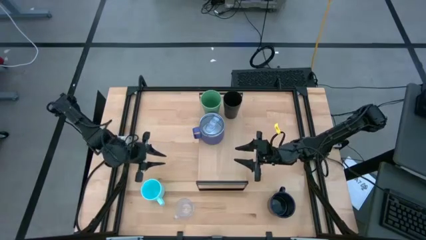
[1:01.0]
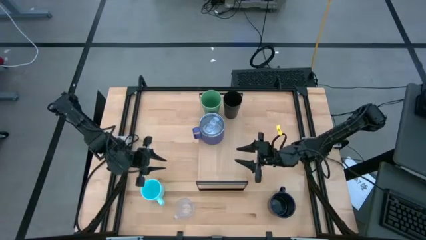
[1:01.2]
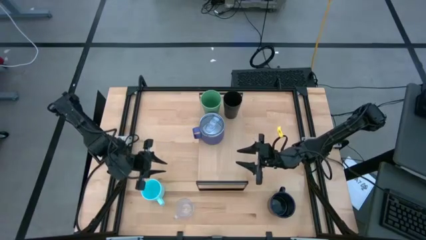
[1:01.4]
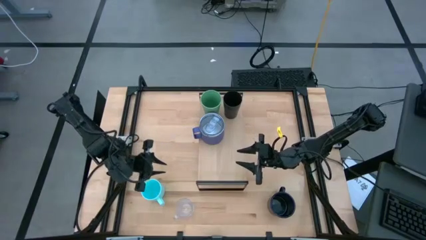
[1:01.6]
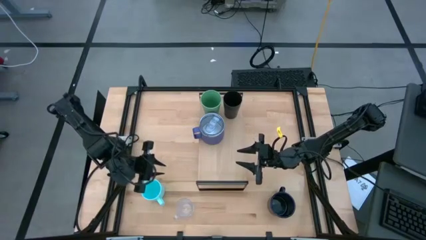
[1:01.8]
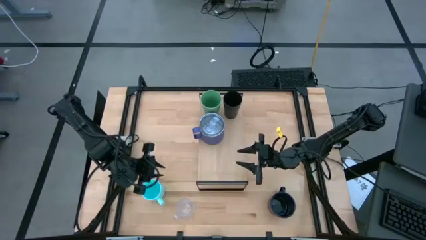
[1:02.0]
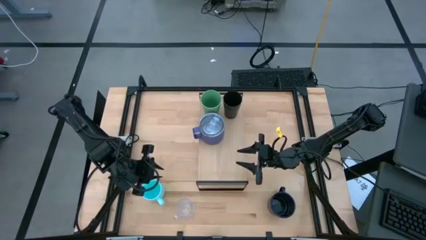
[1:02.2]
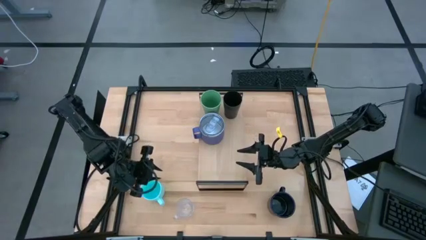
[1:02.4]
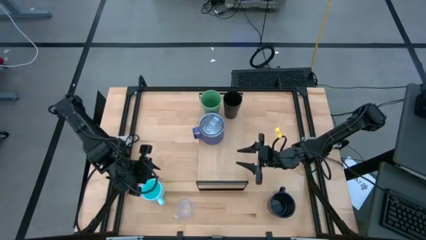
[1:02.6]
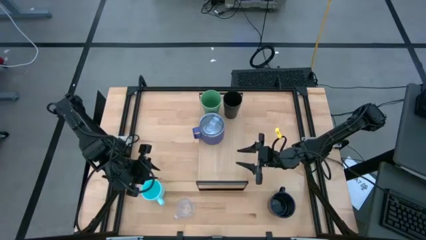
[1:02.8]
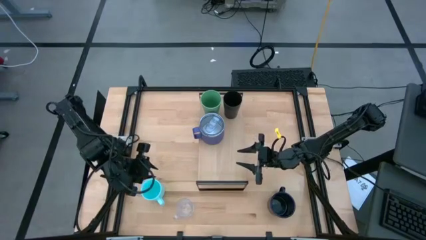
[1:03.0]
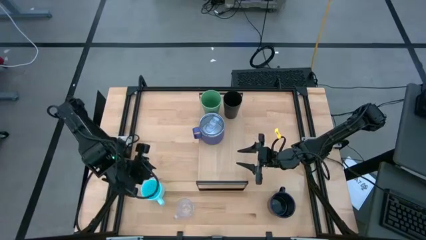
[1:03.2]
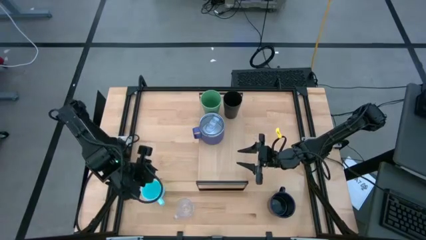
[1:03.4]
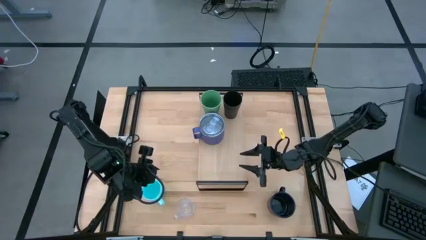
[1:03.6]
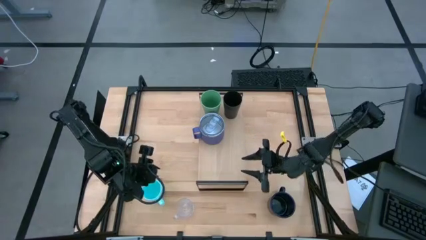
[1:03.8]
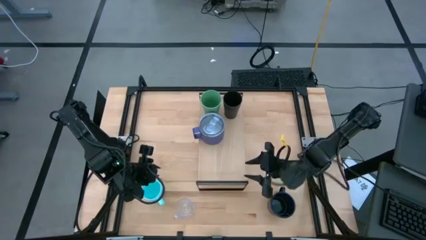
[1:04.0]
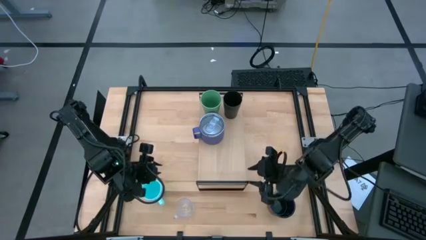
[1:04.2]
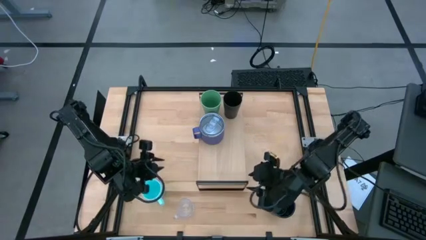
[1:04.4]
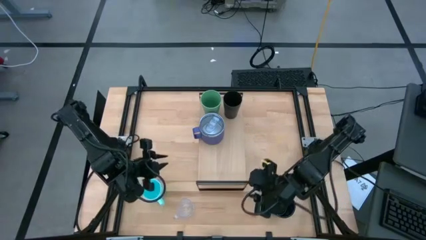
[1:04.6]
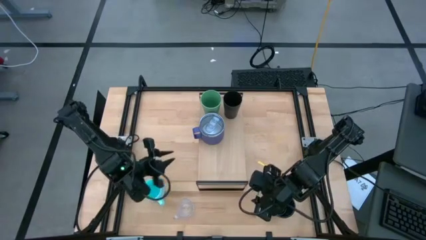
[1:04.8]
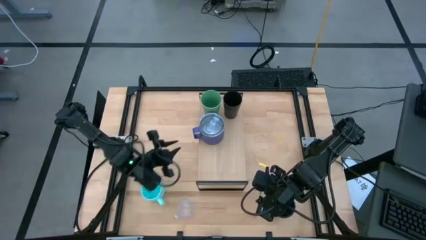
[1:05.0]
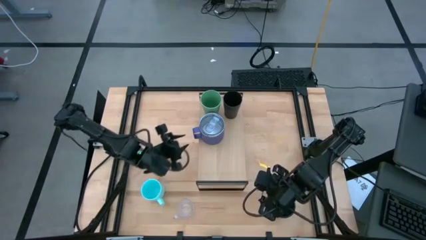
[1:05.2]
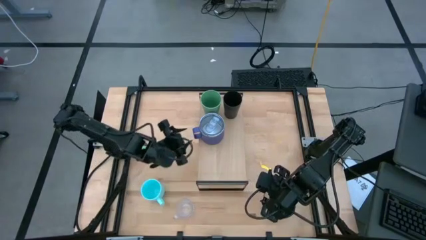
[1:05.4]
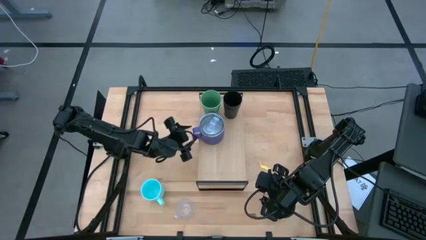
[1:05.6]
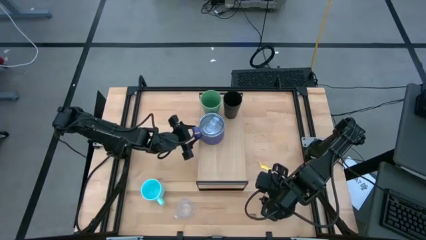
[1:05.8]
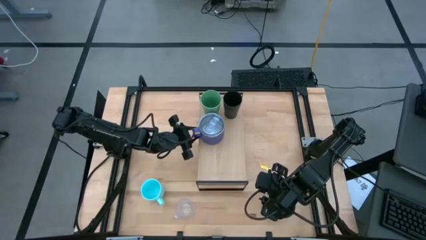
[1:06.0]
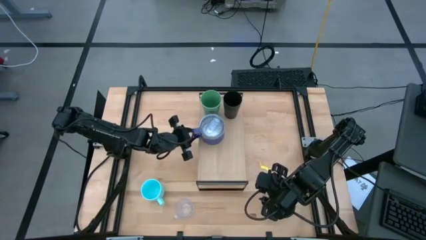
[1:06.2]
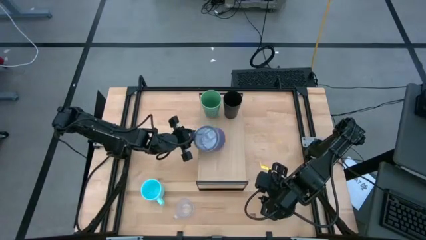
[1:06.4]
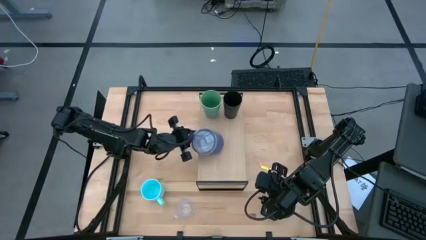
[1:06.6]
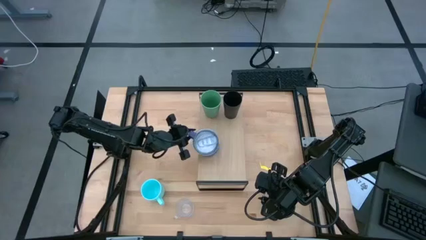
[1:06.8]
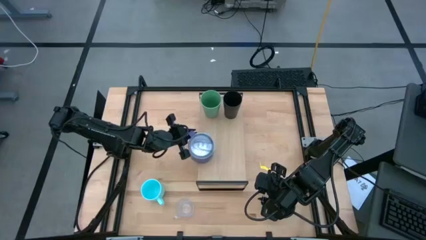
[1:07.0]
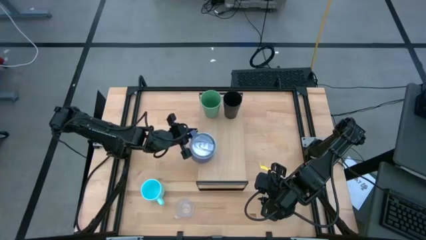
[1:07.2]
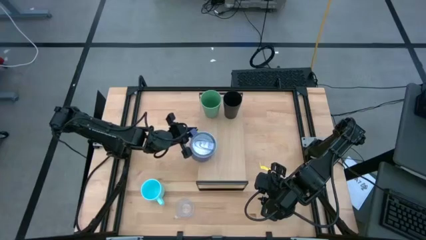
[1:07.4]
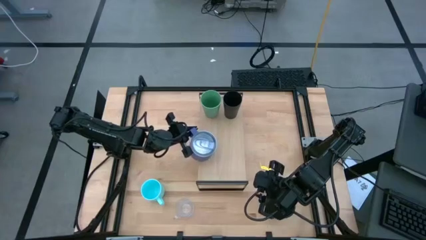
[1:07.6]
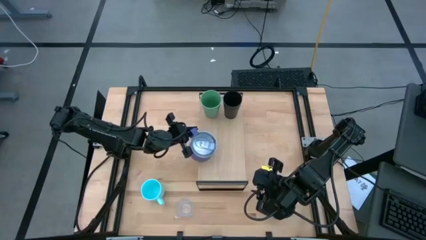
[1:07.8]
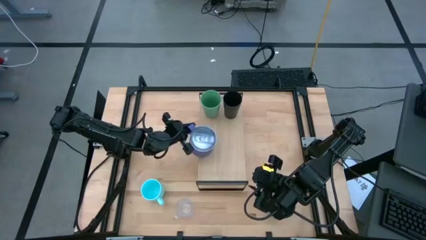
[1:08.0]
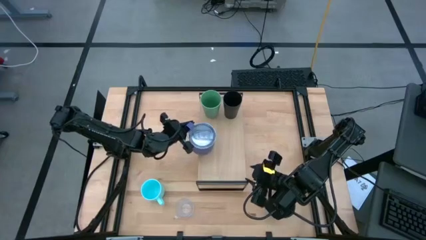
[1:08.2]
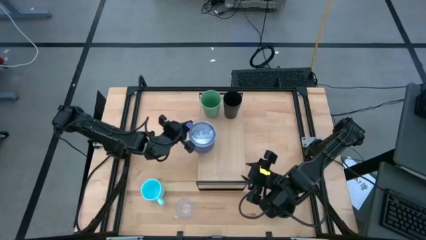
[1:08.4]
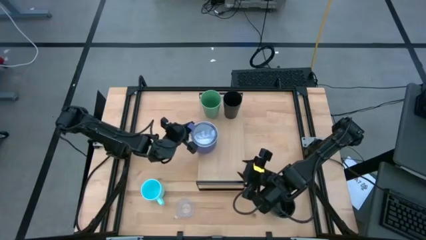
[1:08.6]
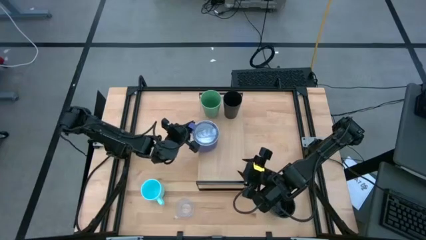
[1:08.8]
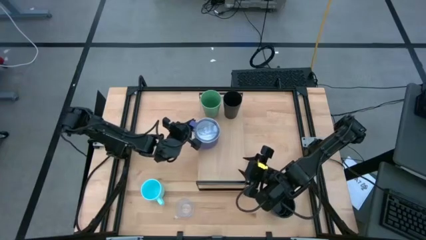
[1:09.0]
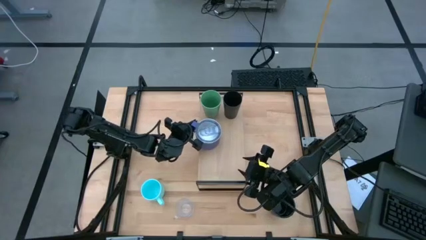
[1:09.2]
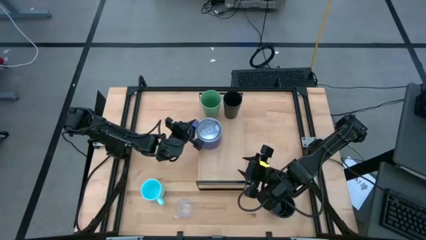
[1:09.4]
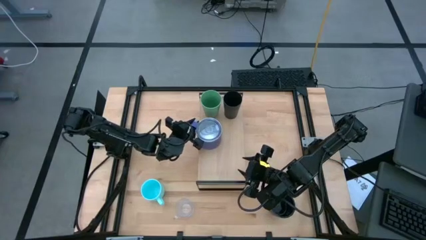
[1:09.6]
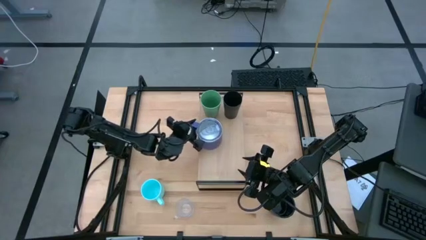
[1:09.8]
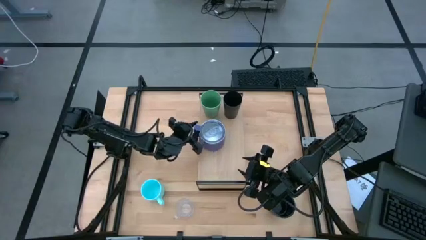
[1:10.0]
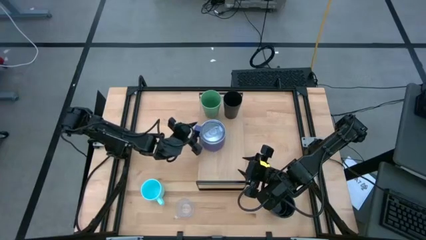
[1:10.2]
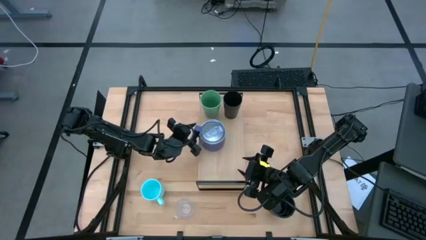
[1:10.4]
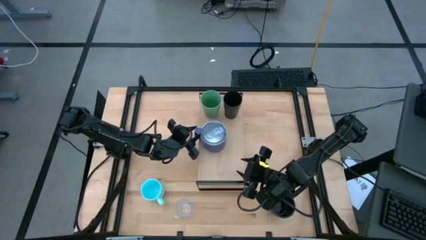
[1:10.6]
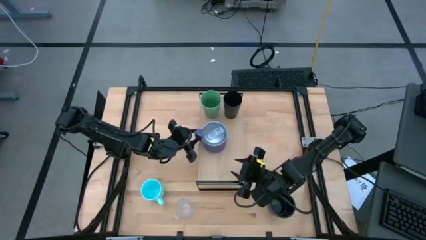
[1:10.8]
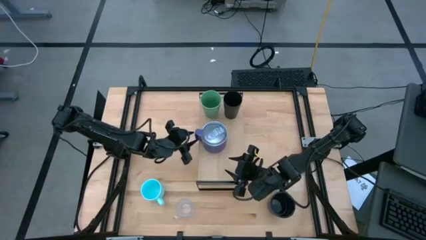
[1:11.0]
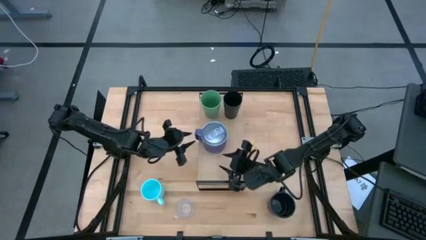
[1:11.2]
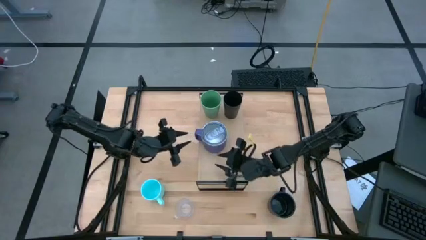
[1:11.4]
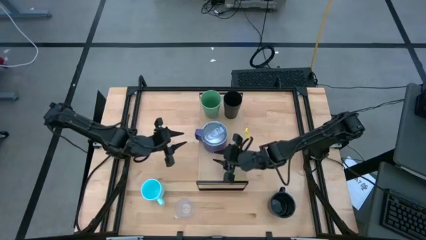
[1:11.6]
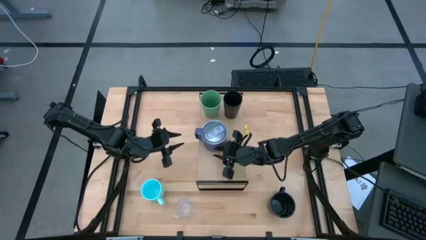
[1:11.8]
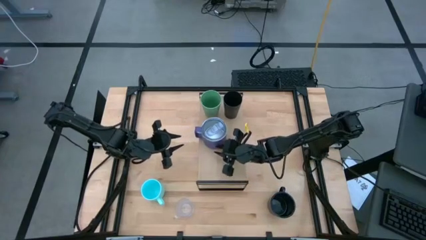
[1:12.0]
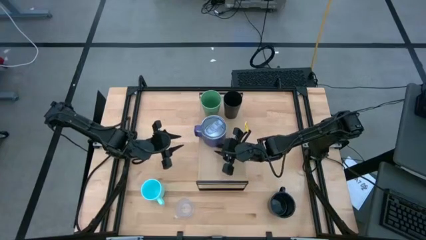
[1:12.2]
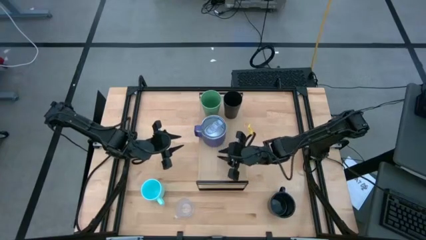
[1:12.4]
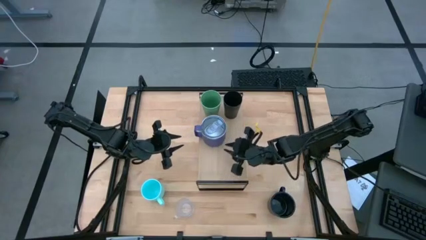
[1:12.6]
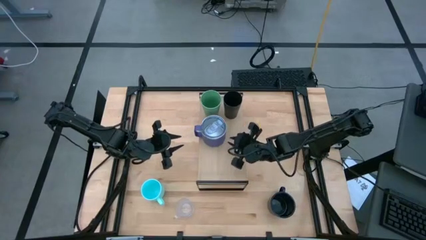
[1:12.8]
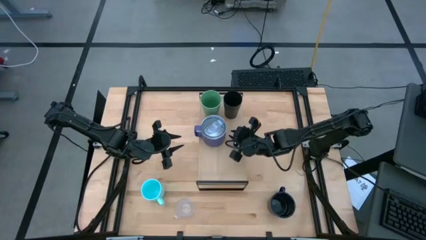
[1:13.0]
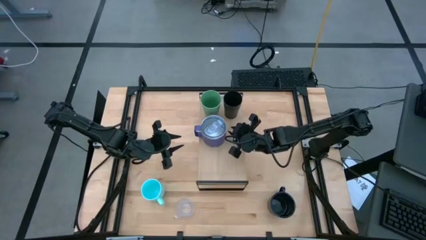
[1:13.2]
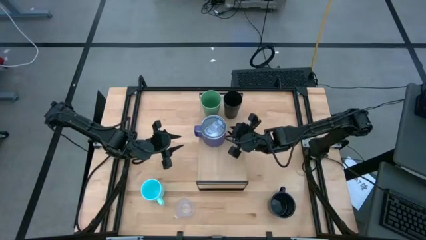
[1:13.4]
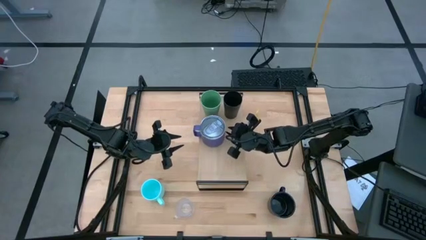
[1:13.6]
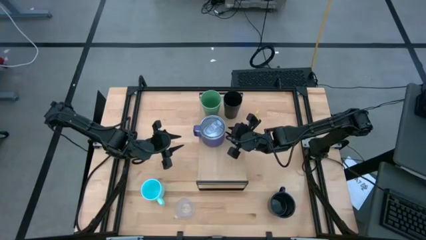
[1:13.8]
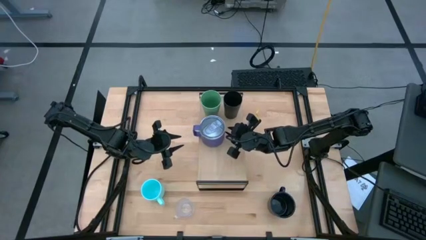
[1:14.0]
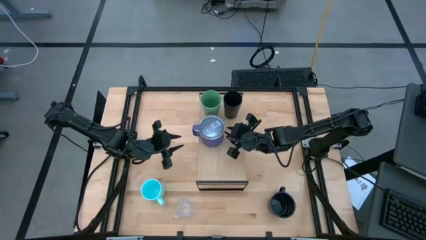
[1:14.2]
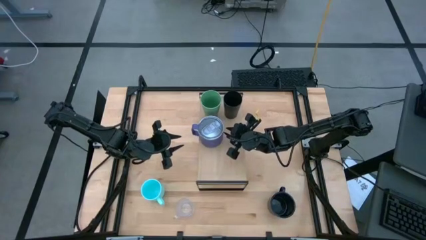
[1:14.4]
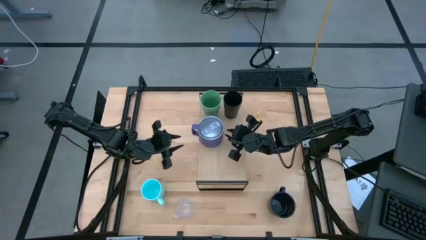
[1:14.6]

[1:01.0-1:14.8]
Task: Stack small to large cups/mugs on shelf
Put the purple mug on the shelf

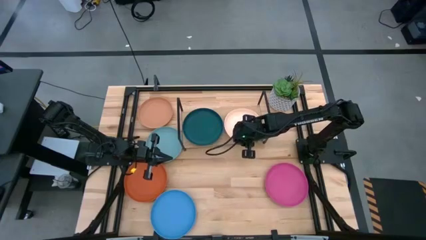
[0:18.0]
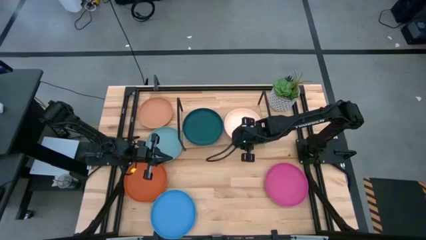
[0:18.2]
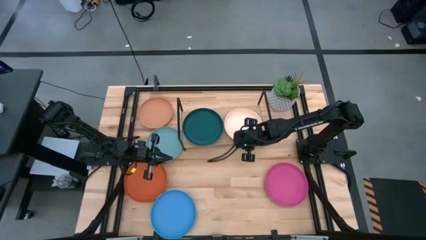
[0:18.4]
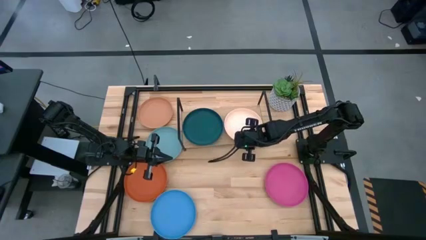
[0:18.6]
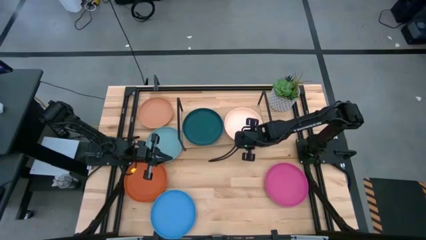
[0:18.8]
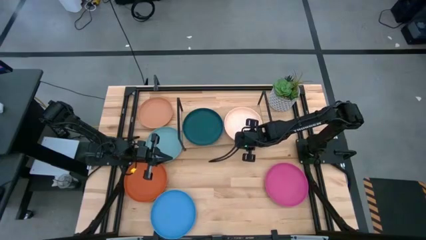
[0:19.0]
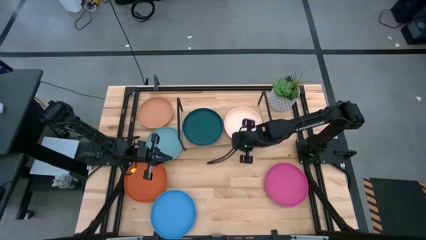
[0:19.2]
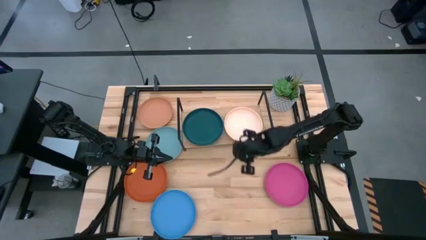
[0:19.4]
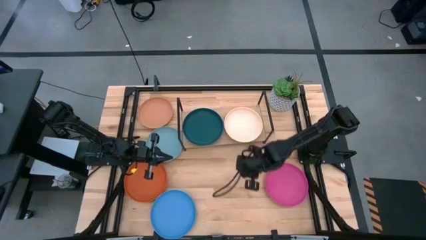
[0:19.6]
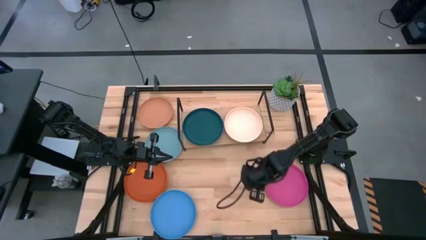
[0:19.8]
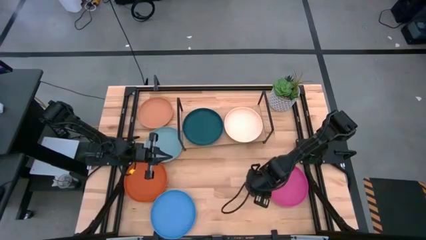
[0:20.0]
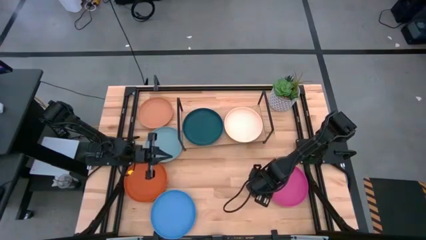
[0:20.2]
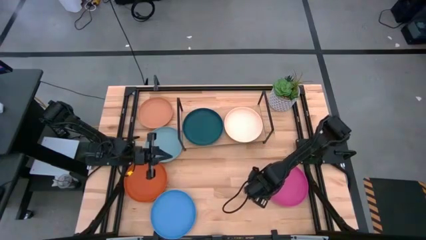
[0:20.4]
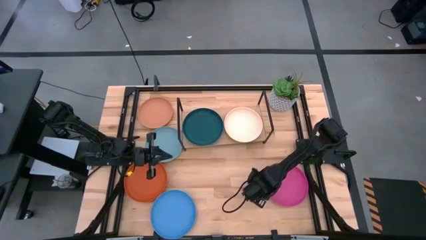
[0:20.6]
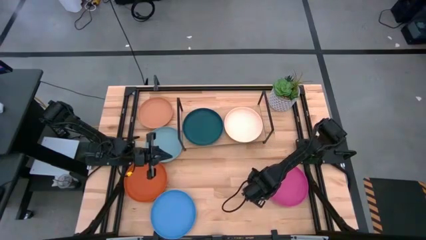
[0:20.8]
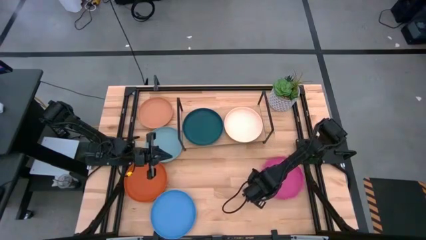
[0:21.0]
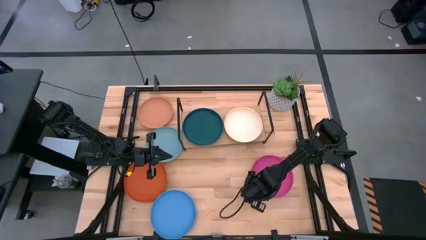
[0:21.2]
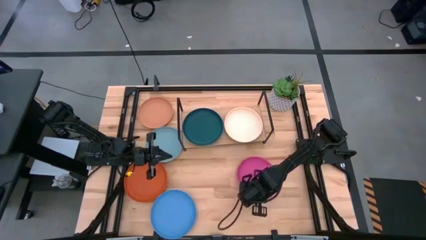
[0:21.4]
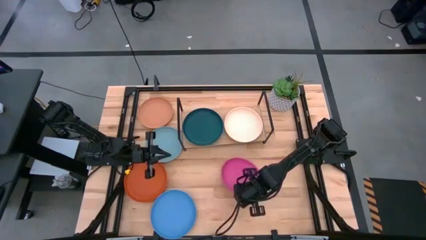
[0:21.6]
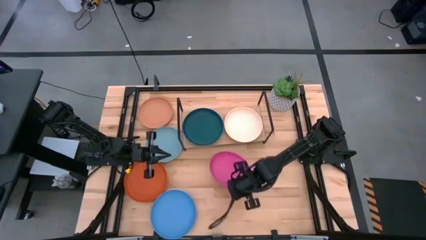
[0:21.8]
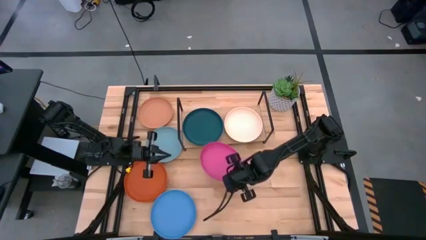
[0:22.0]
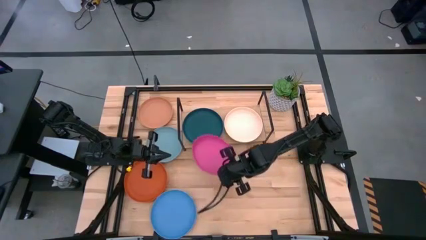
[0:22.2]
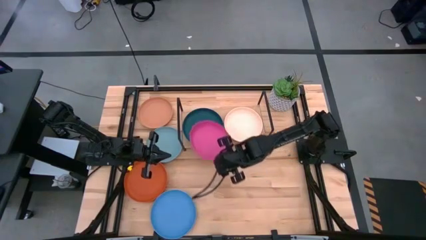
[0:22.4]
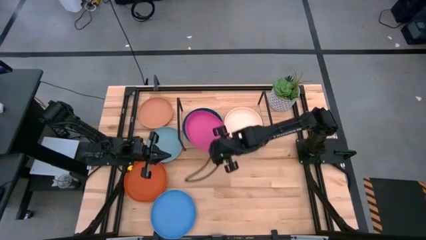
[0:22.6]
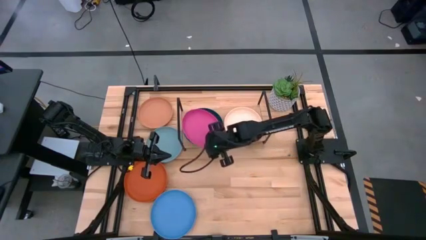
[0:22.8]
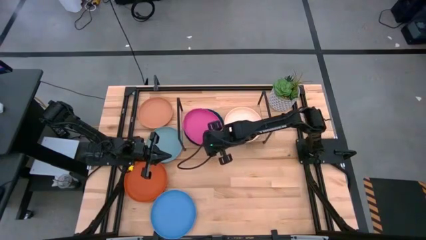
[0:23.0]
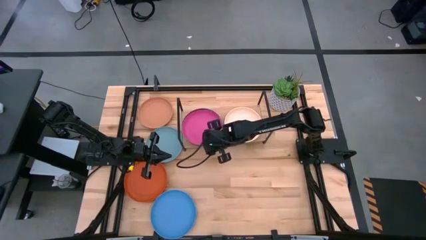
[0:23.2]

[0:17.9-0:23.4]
Task: Place and stack plates onto a shelf
Stack the pink plate on top of the dark blue plate on the shelf
